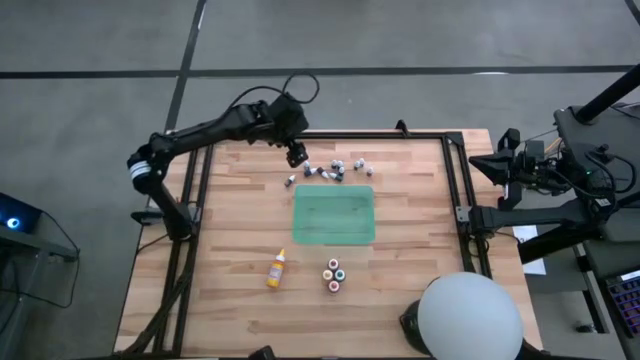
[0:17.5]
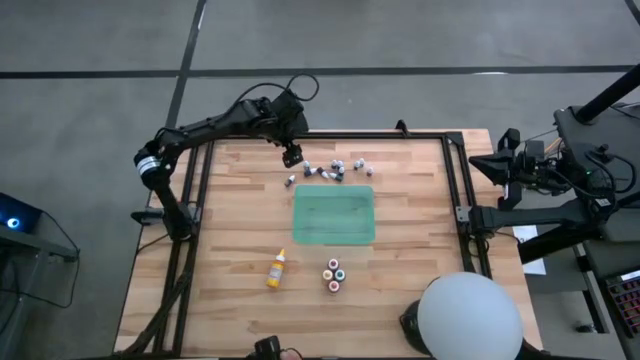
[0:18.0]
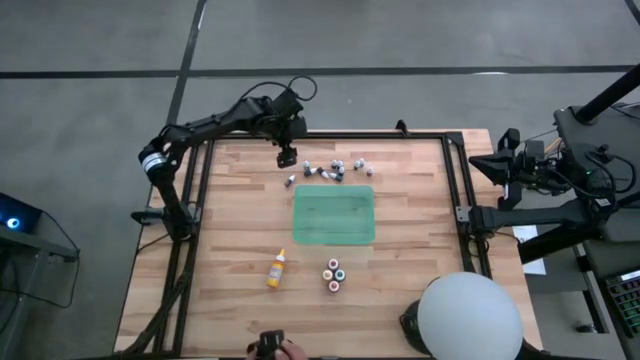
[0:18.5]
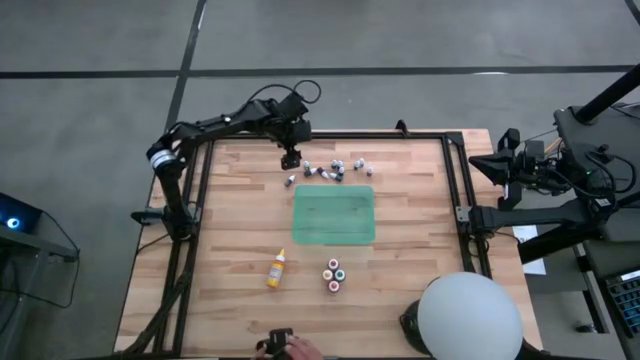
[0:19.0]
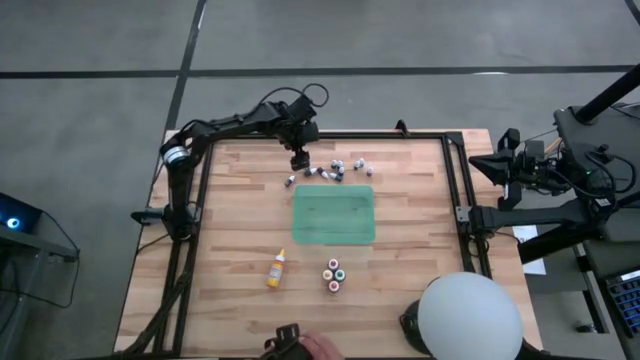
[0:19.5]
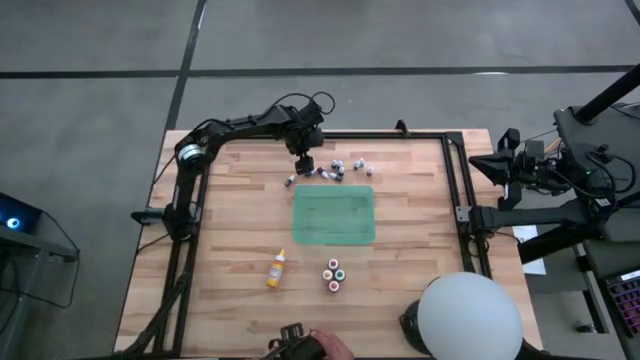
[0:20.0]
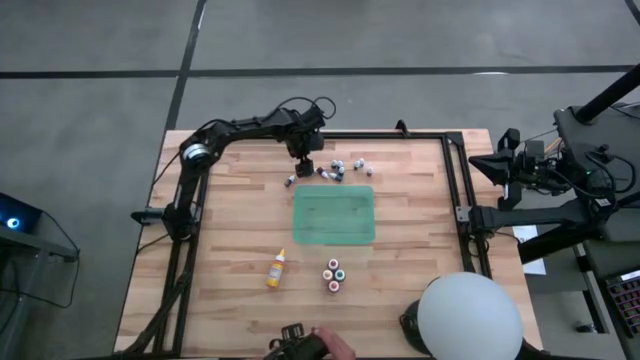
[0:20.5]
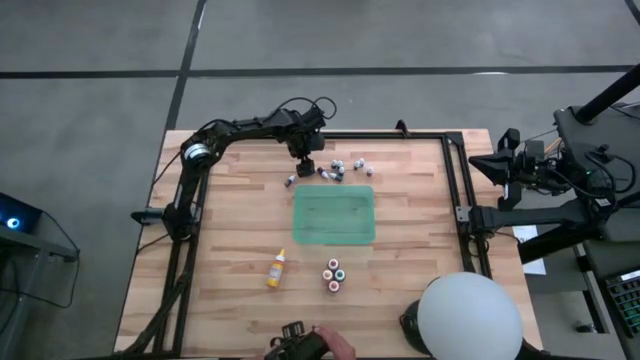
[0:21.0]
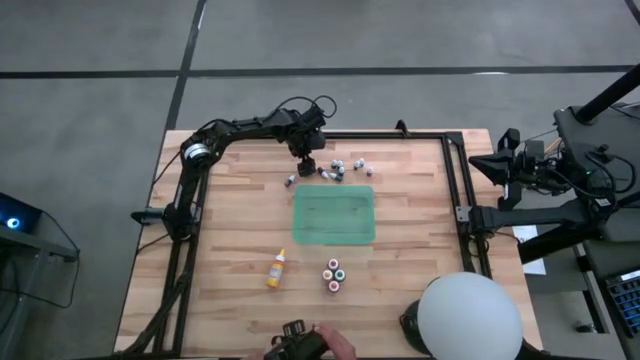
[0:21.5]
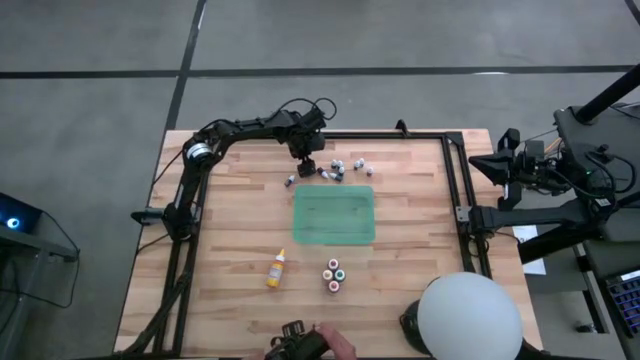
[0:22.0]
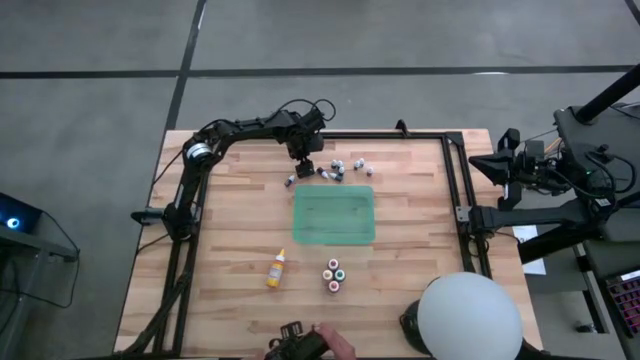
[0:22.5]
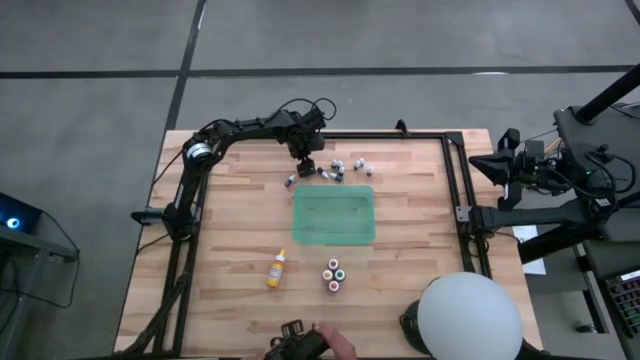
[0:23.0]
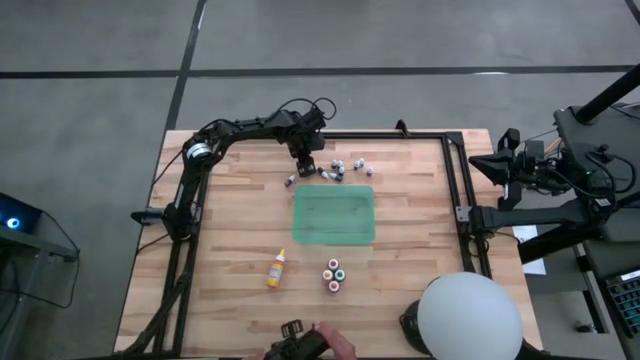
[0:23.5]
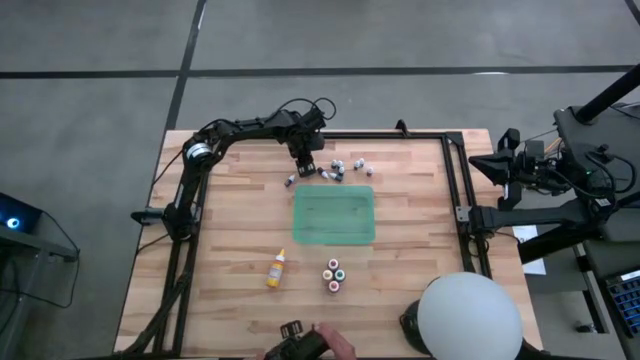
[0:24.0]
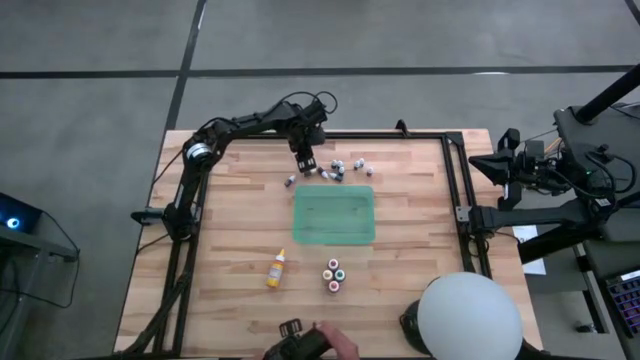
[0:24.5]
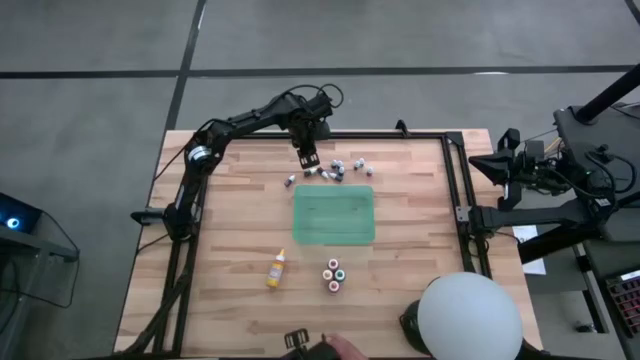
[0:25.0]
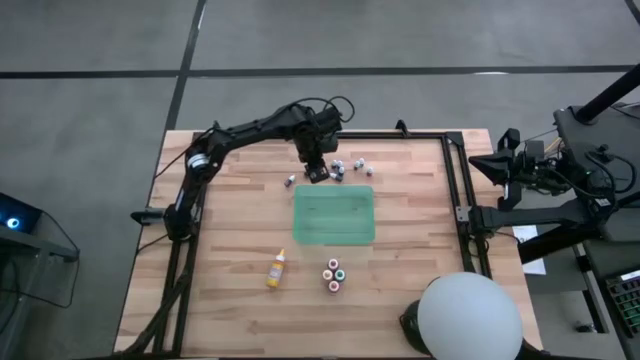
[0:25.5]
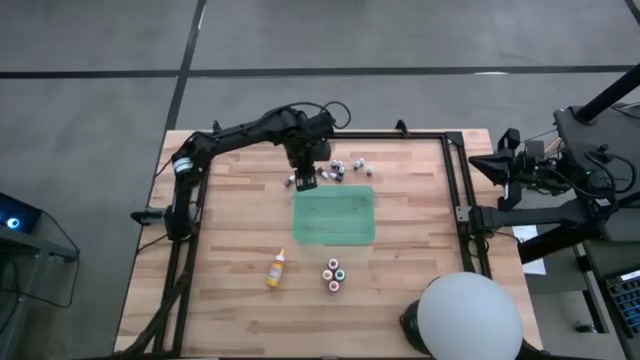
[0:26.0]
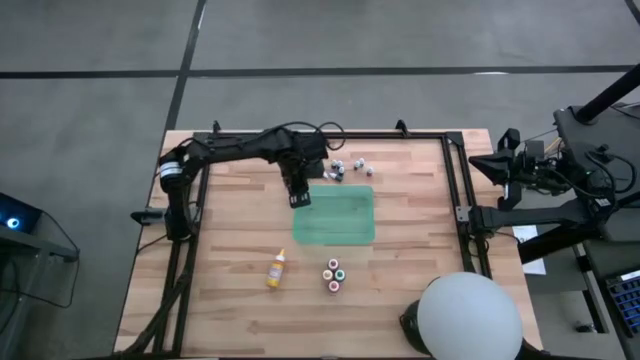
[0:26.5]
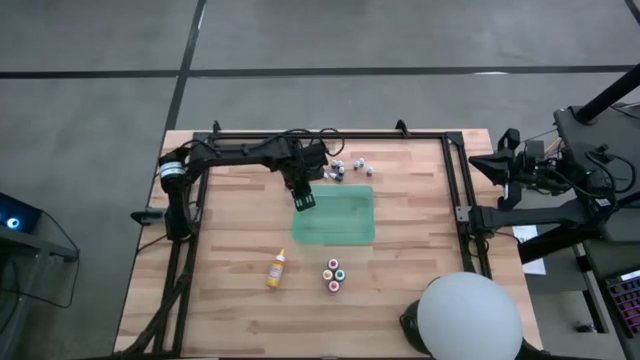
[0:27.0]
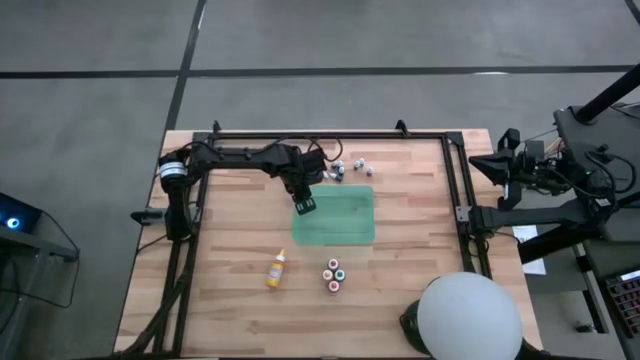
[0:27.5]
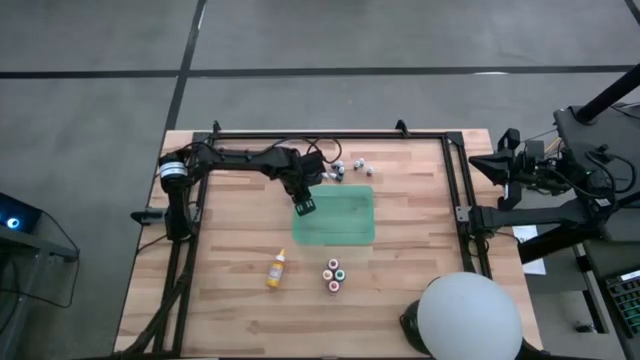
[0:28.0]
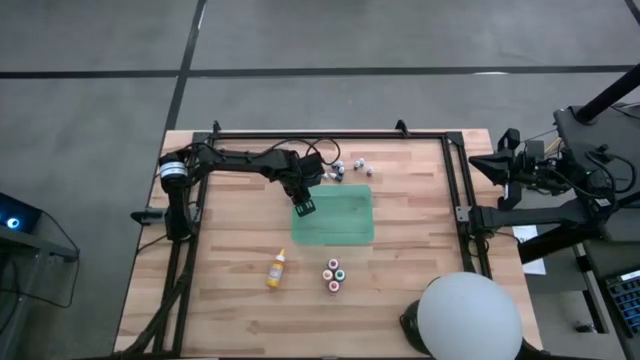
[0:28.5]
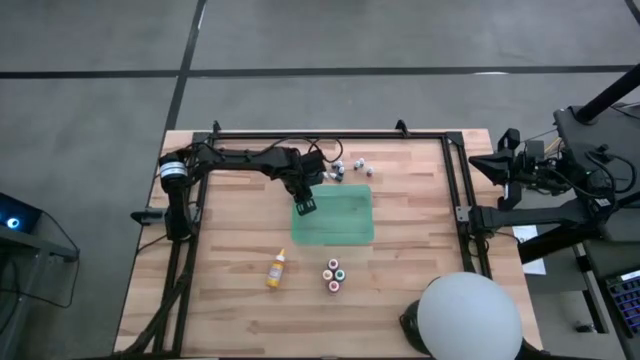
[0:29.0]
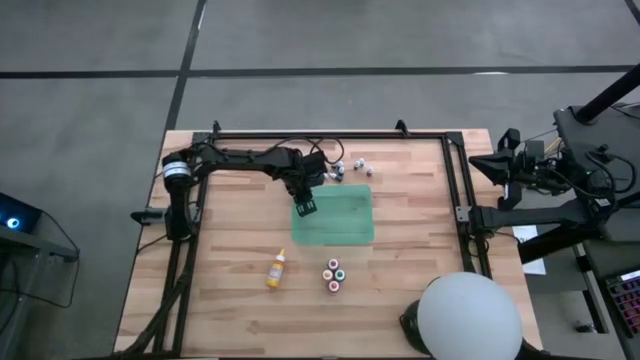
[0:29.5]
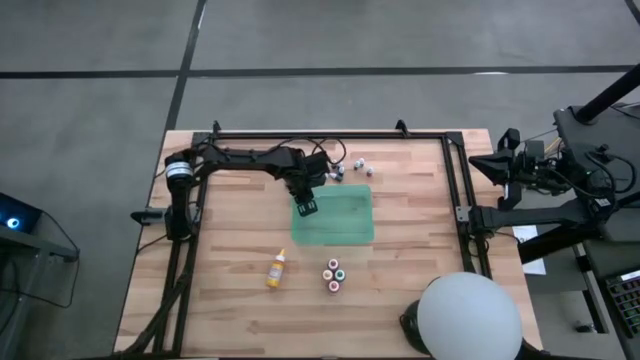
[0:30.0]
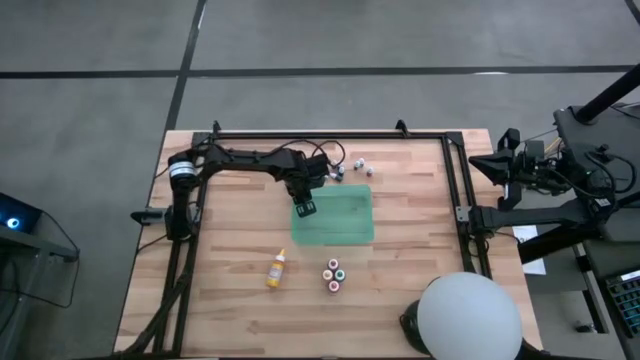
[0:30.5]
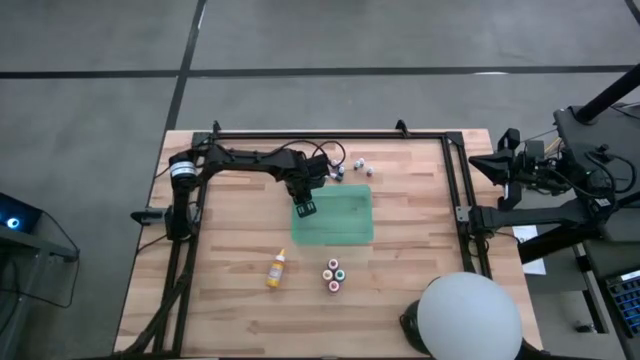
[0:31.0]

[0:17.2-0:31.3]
Task: Pick & Place food coloring
Put the black food coloring bottle into the green container

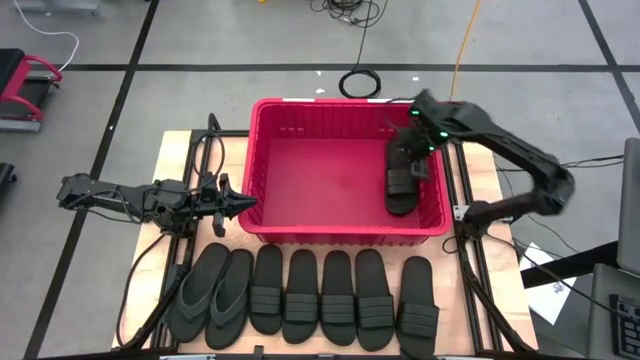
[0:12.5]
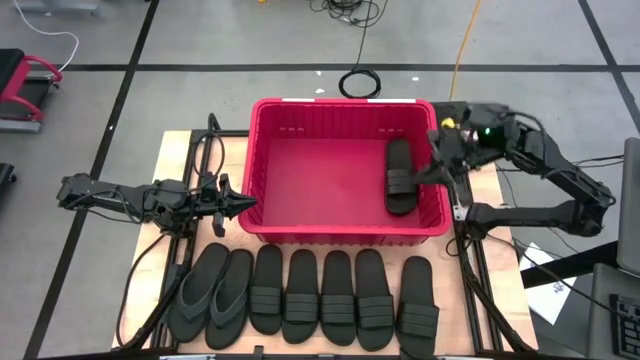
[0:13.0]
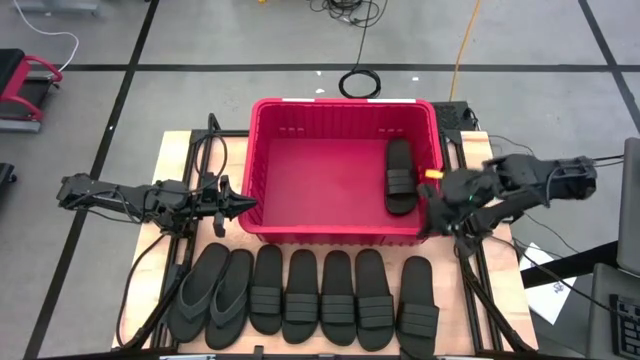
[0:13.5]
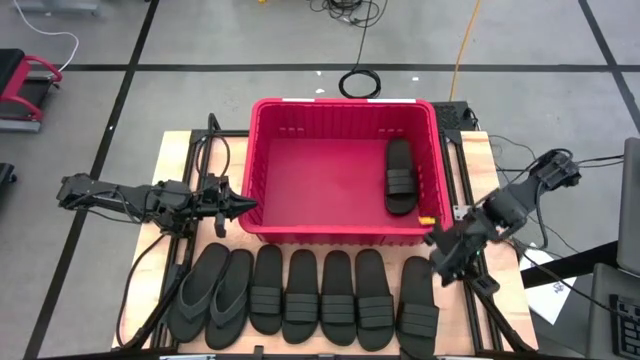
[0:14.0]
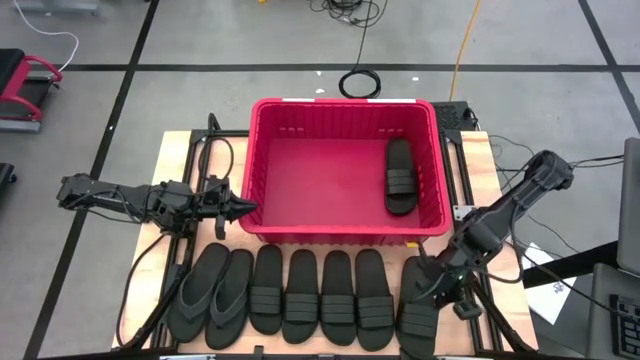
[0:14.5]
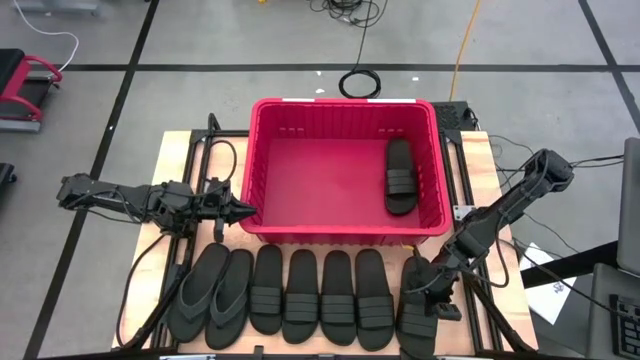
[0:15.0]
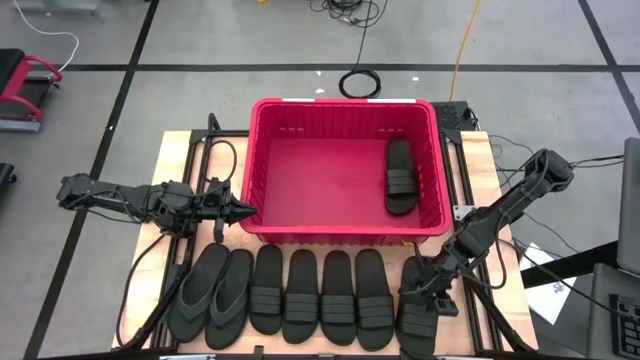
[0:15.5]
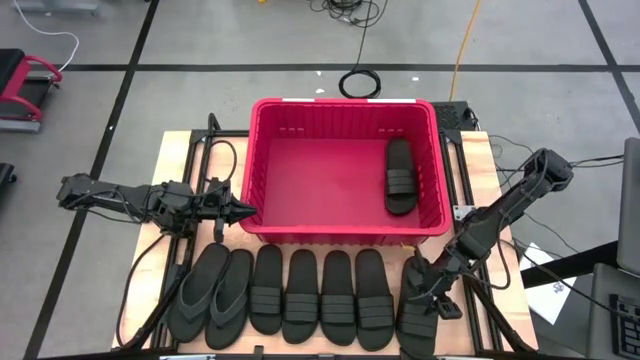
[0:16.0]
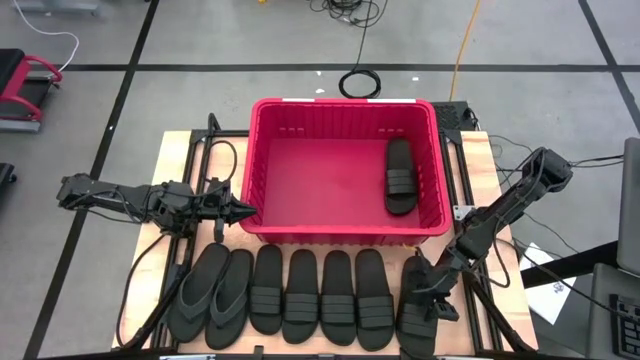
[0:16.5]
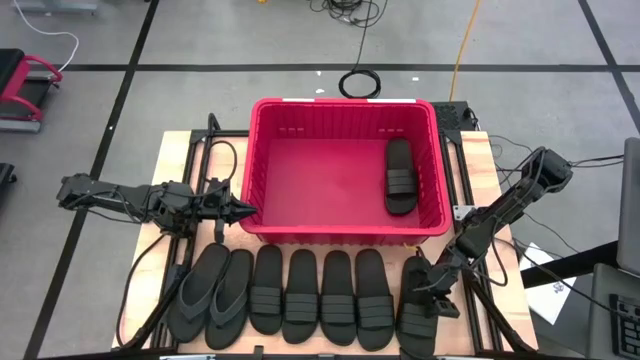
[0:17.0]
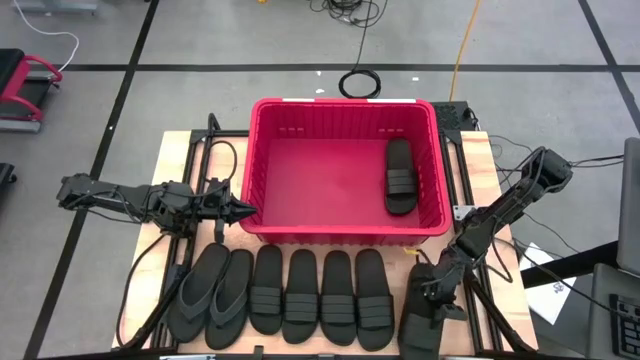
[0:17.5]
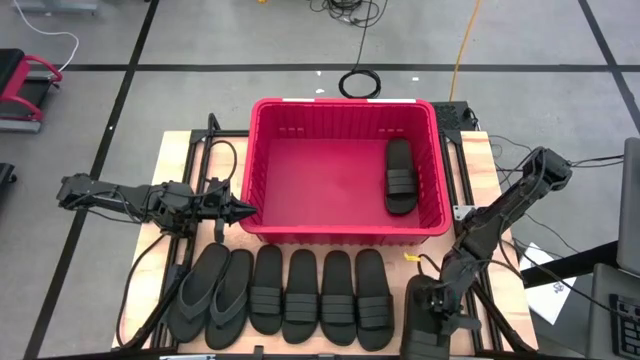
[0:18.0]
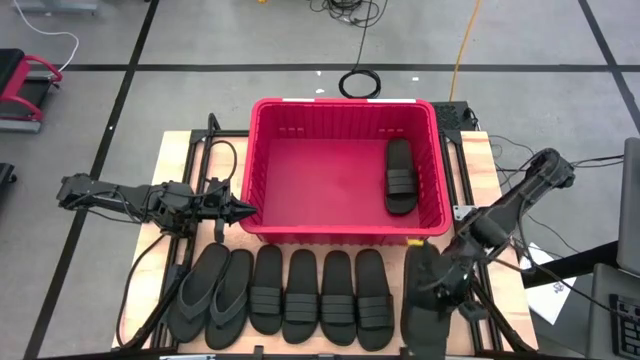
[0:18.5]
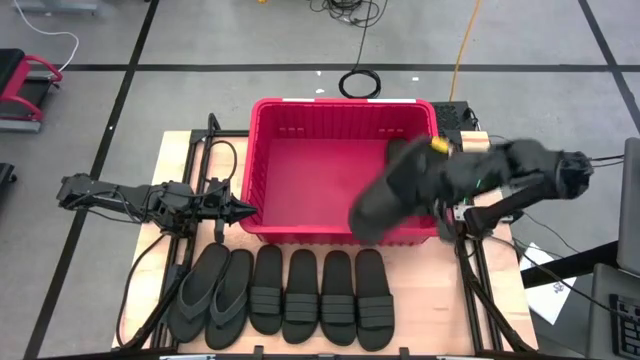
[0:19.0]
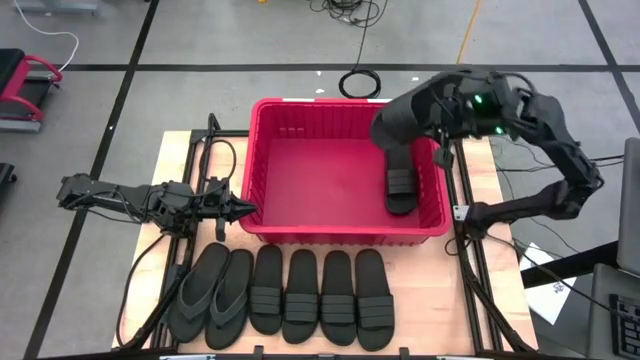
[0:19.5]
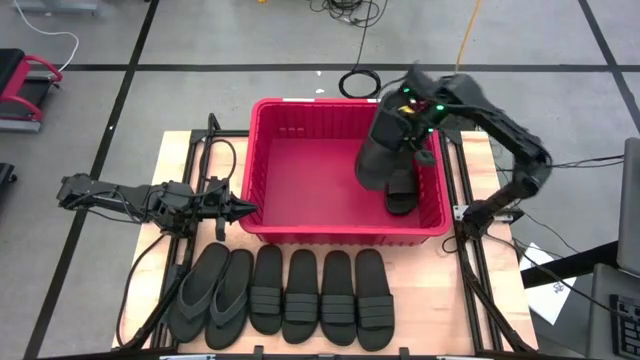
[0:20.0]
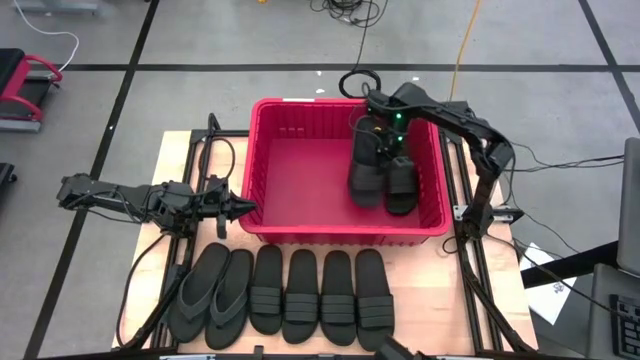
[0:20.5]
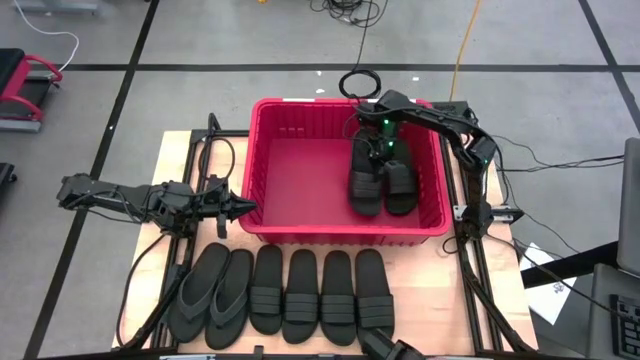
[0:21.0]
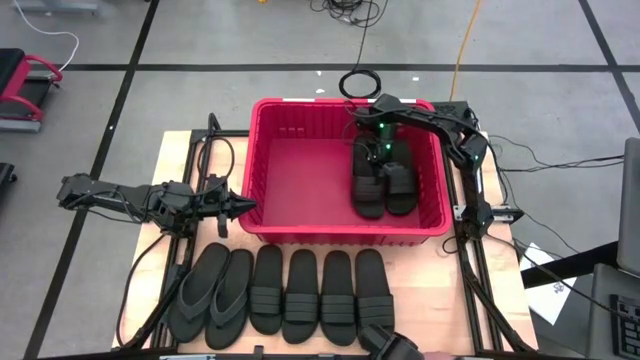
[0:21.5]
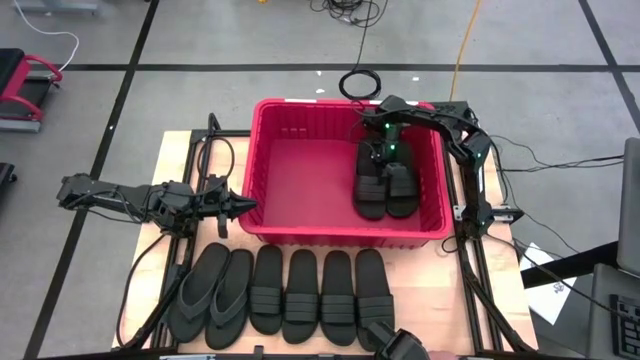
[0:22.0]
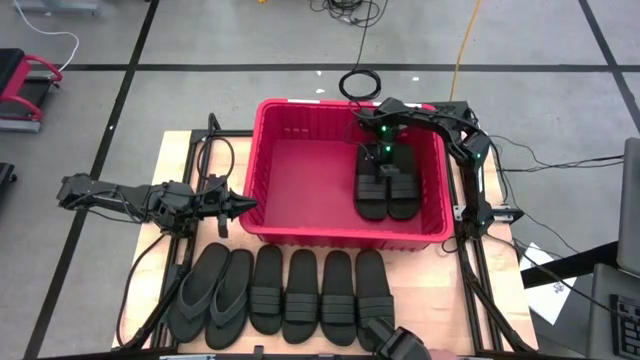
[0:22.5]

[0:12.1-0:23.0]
Task: Pick and place slides into bin
Put the black slipper into the red organizer bin
